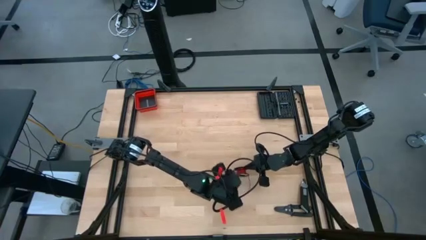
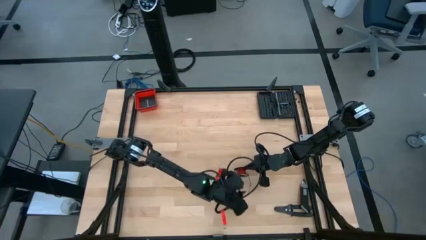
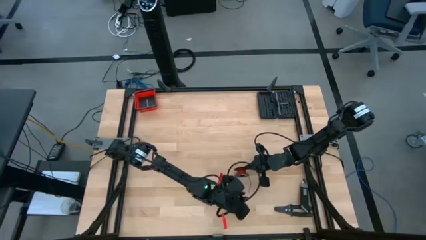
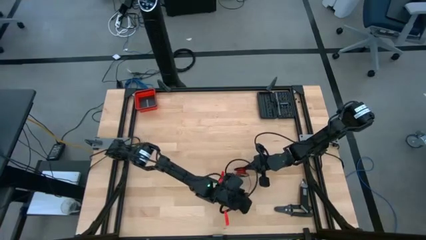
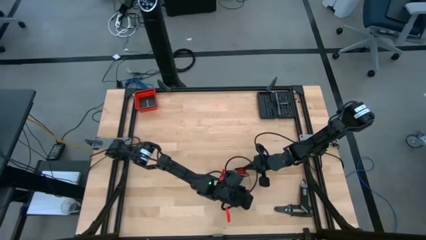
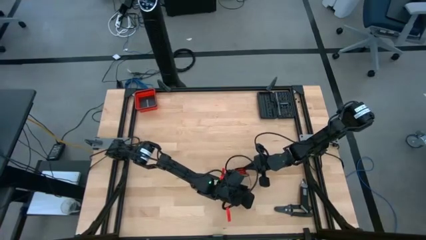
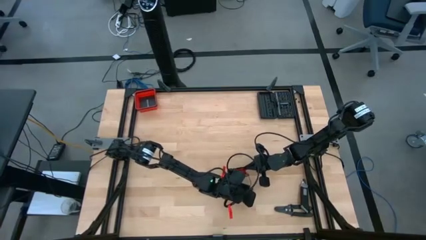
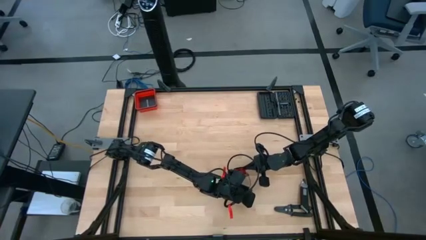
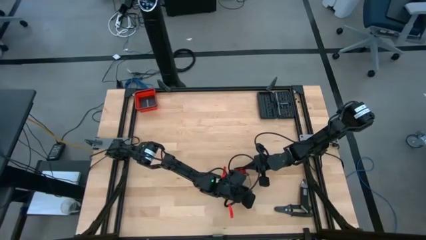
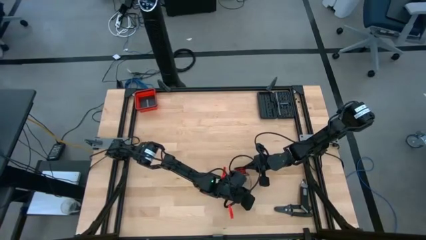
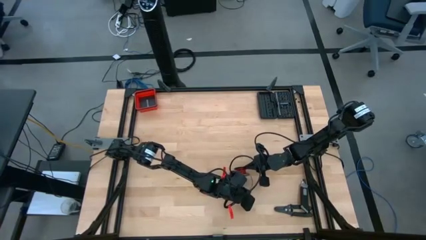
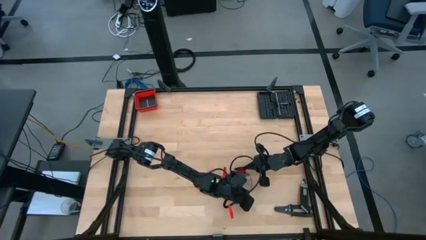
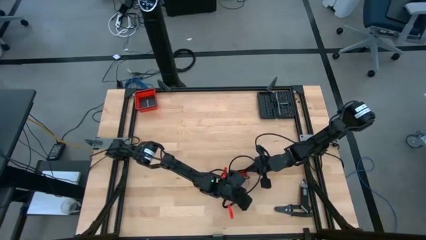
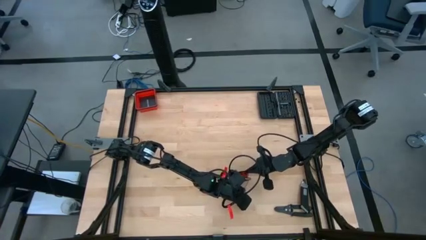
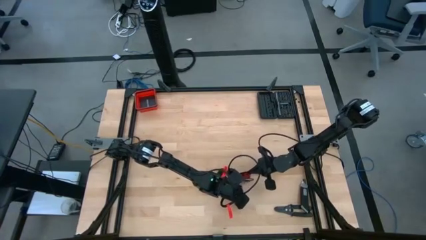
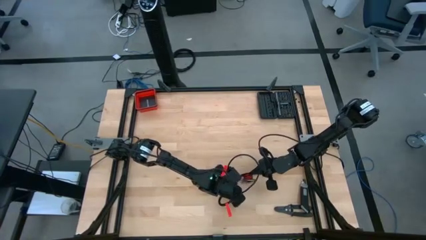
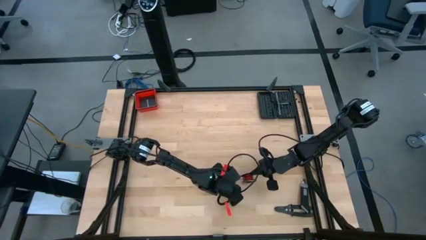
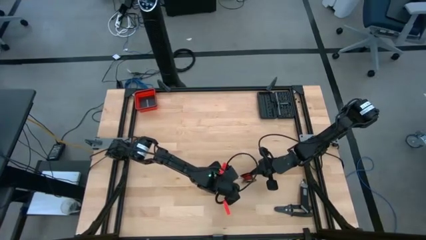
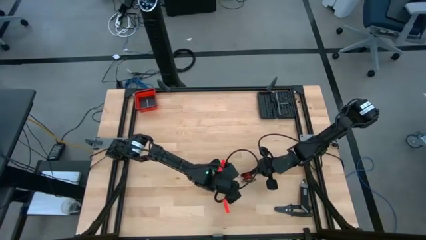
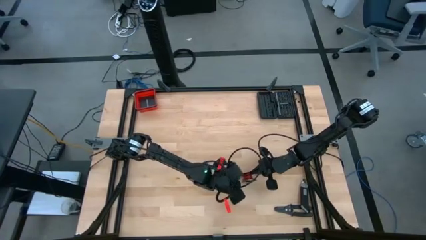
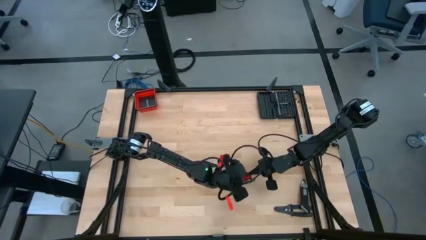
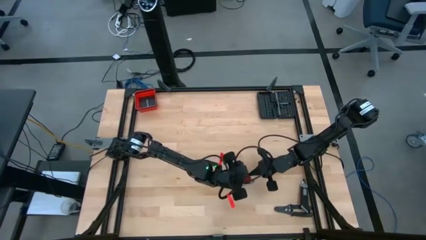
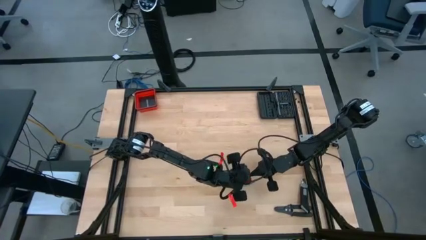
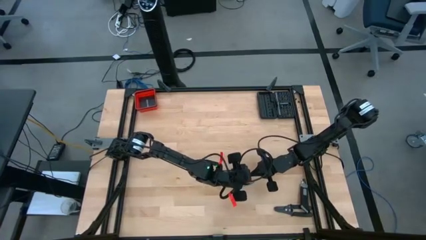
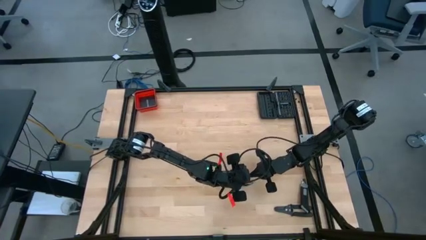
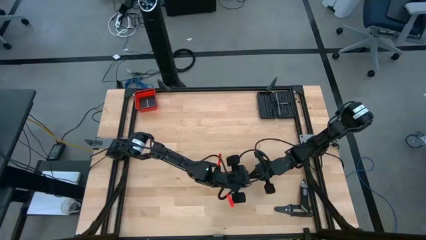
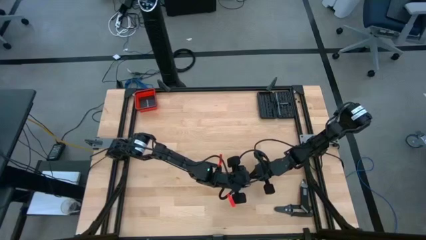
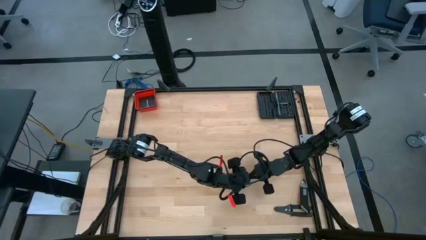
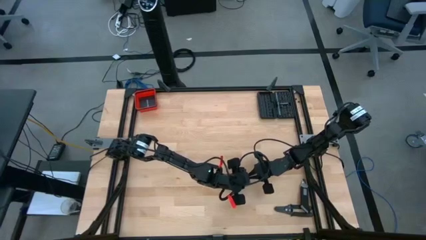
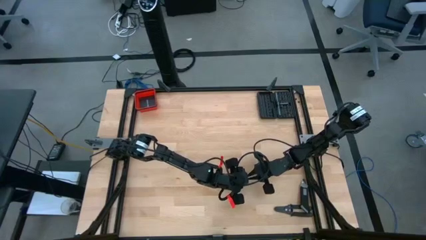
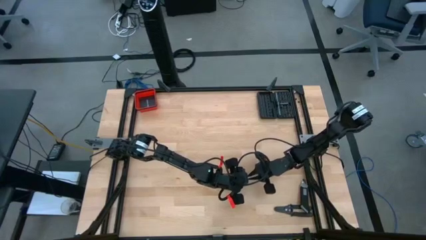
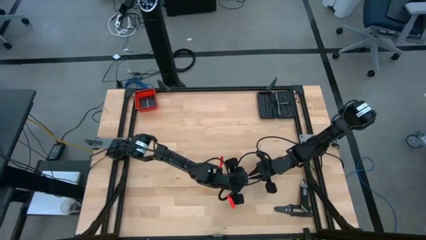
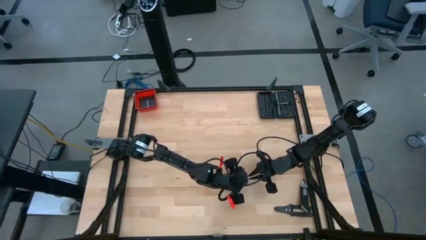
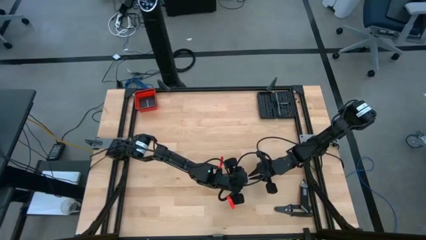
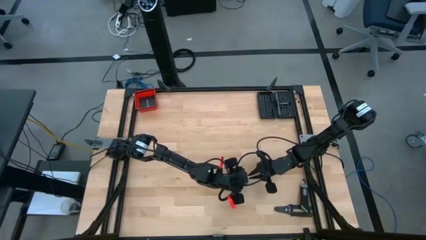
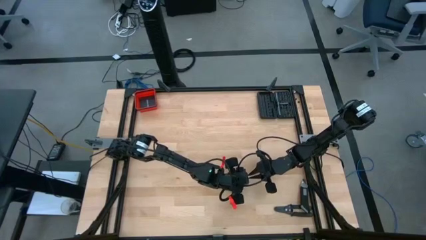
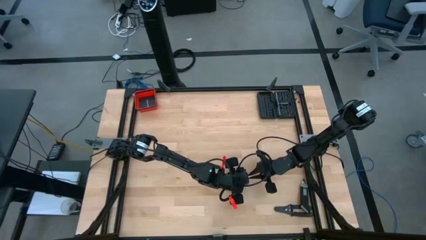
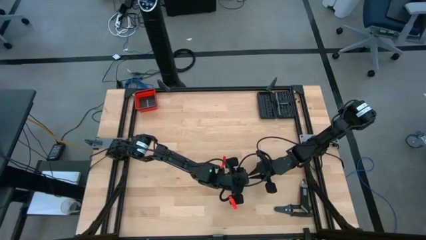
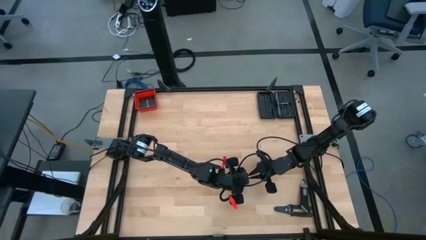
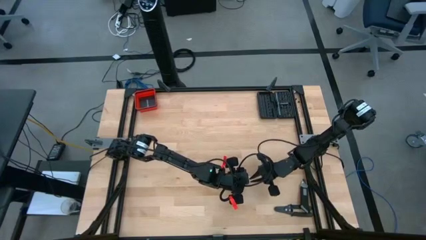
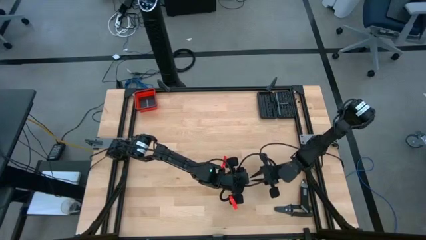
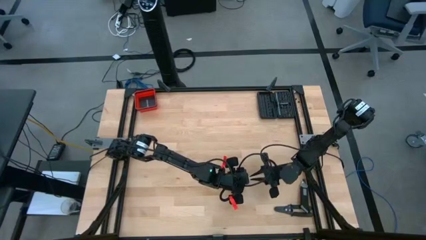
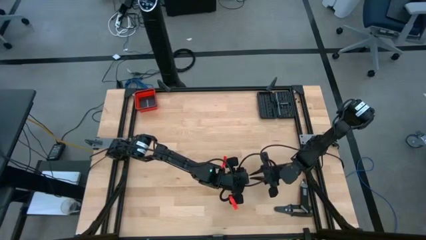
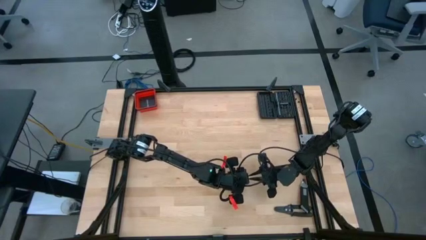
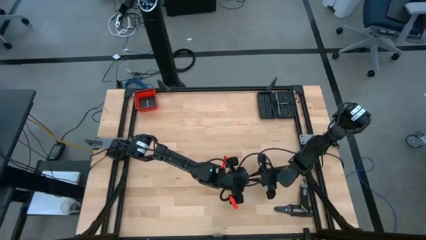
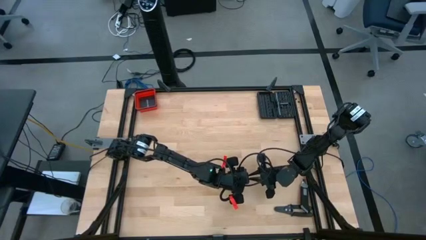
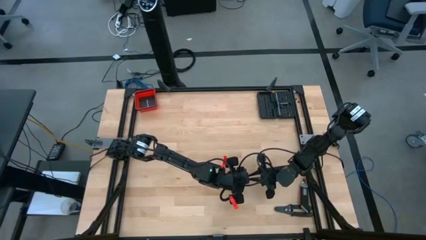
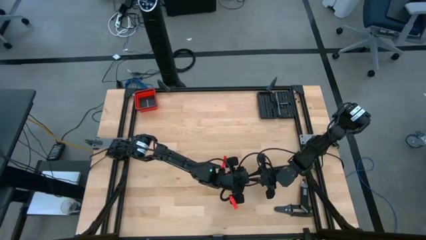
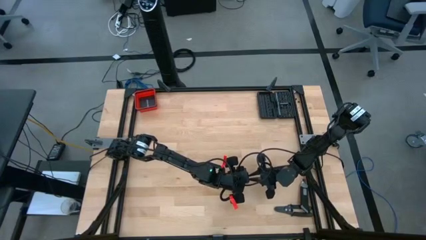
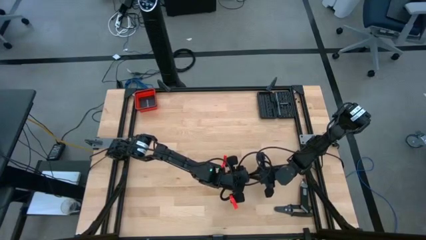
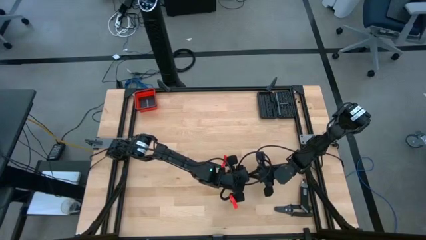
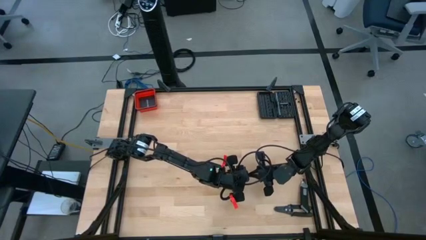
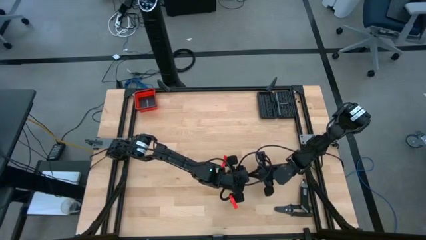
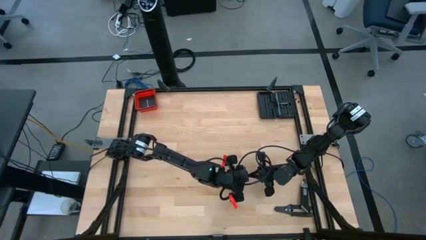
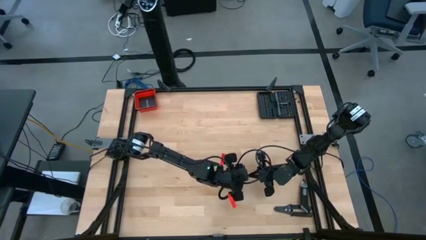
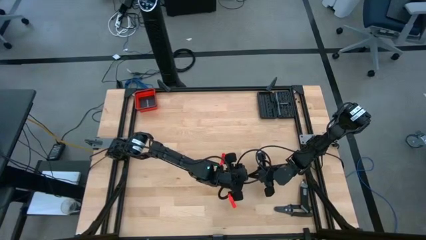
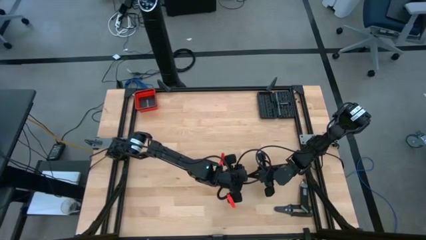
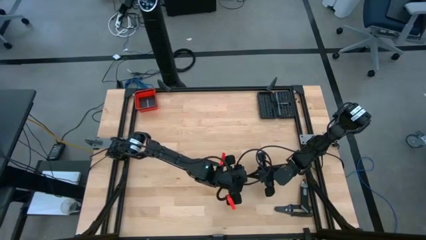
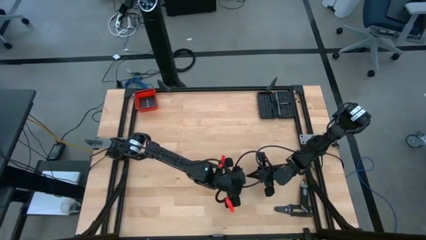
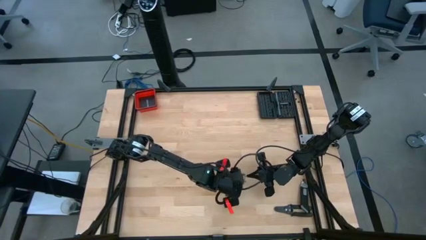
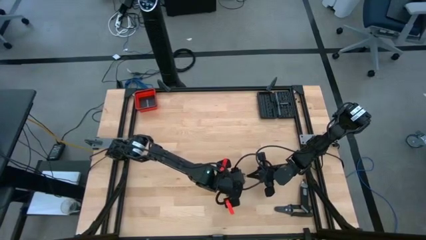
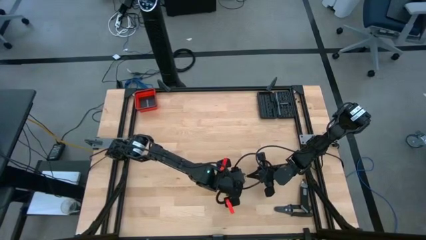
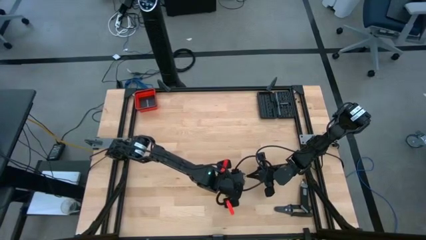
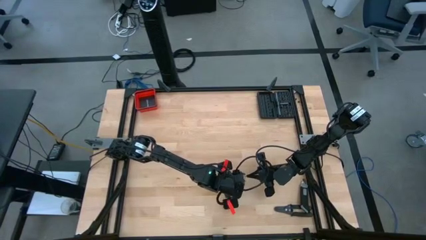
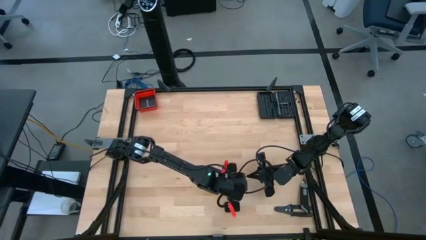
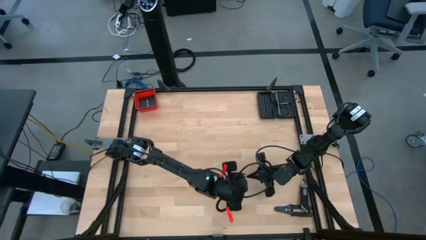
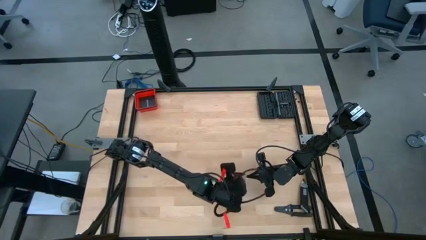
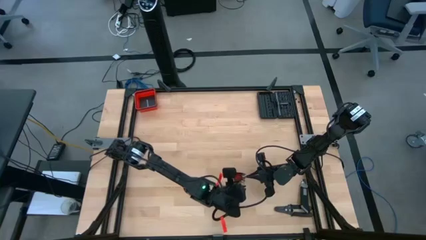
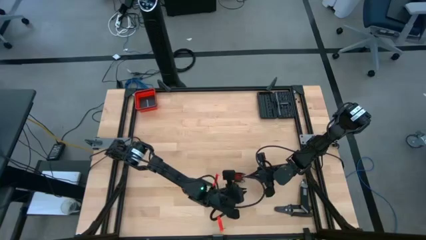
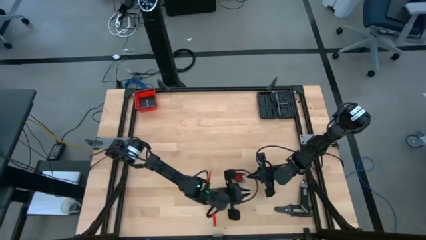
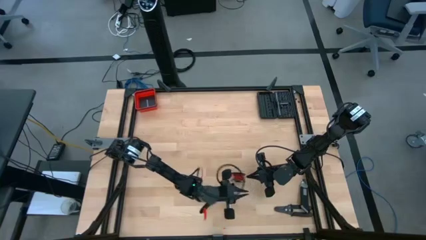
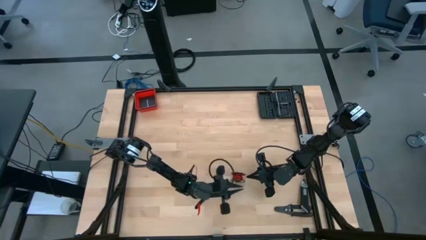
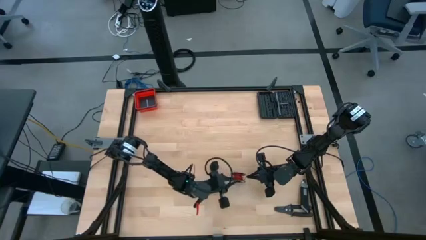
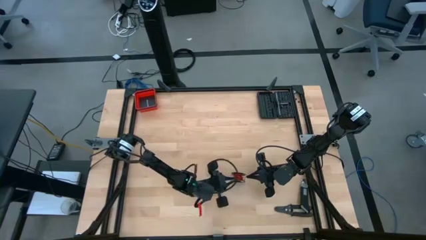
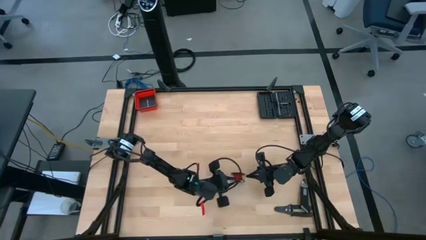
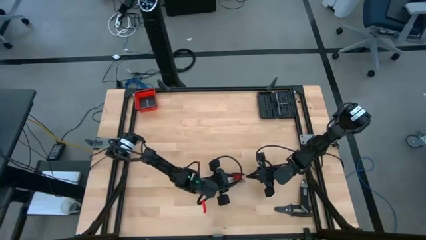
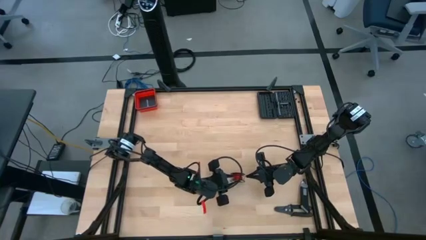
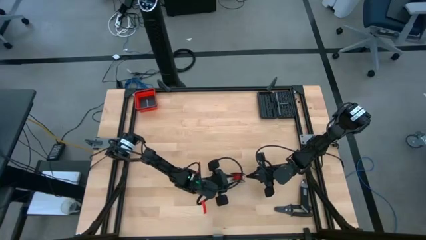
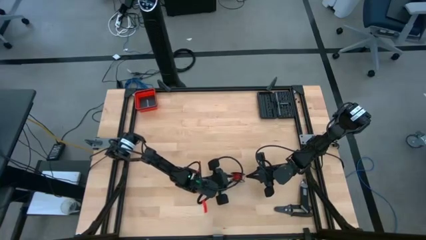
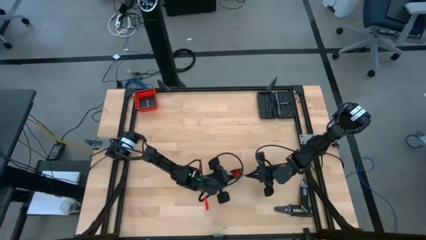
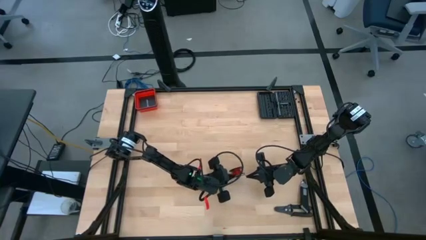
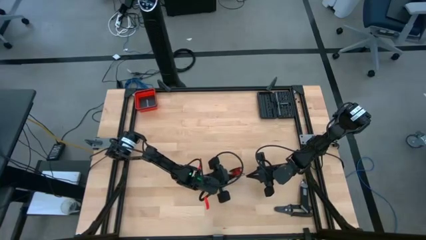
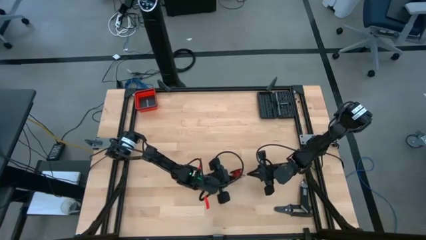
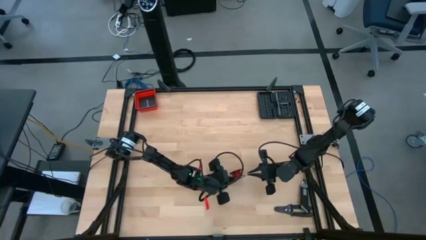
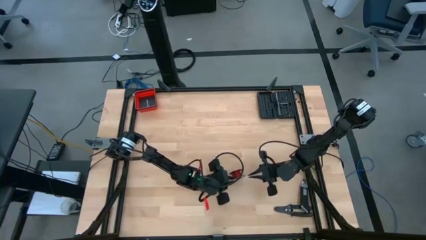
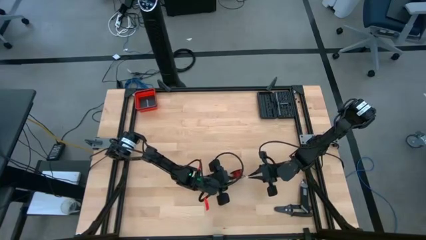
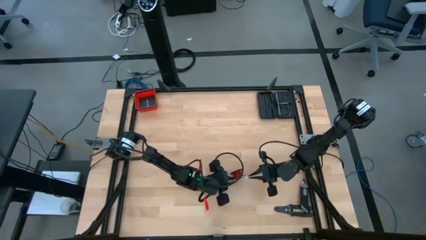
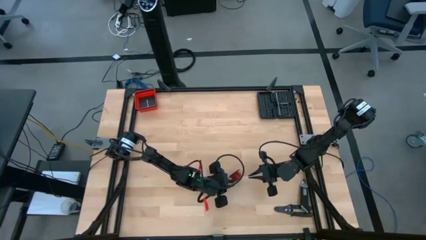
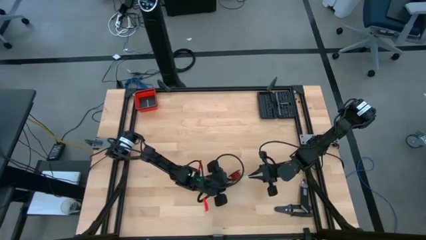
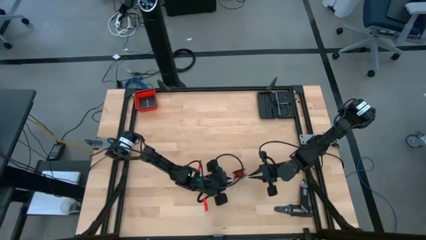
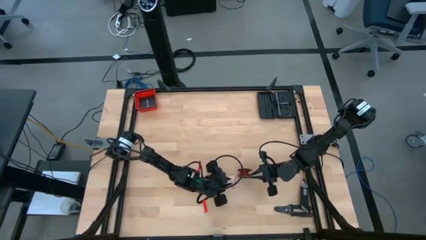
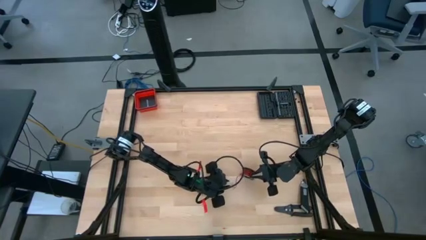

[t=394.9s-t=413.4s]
Task: Coil cords
Coil the red wire onto the spool
